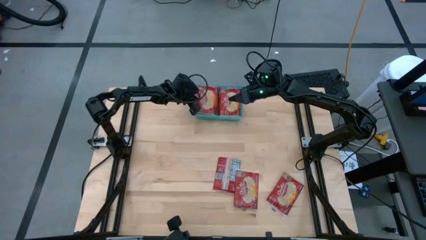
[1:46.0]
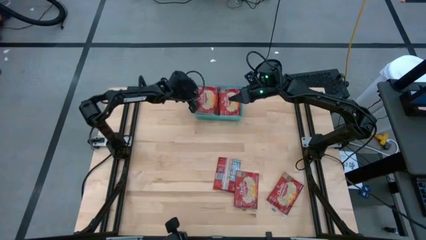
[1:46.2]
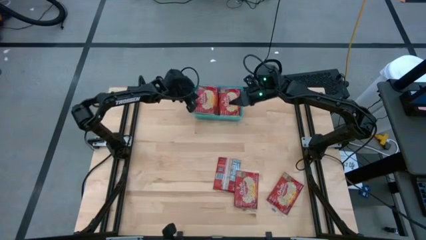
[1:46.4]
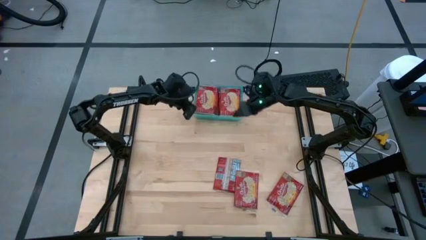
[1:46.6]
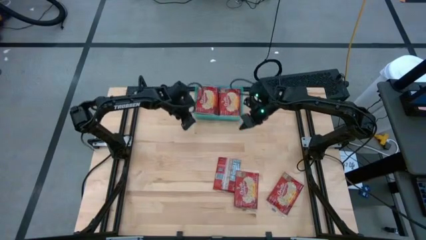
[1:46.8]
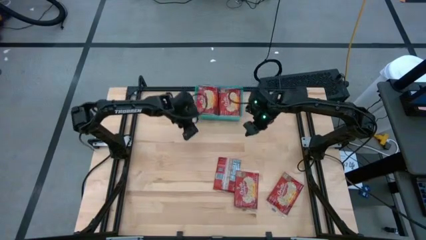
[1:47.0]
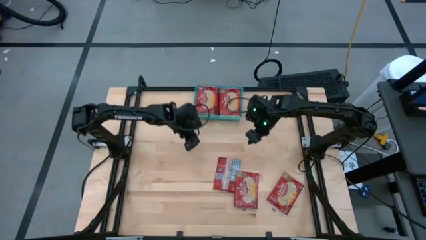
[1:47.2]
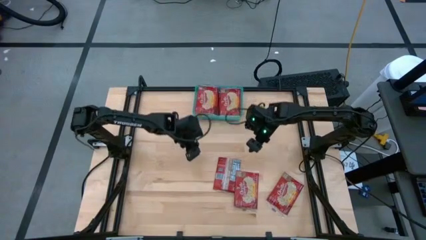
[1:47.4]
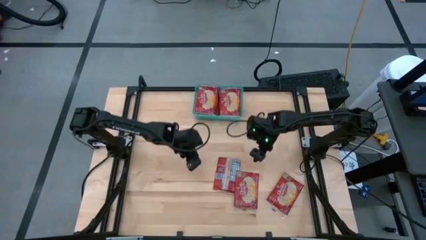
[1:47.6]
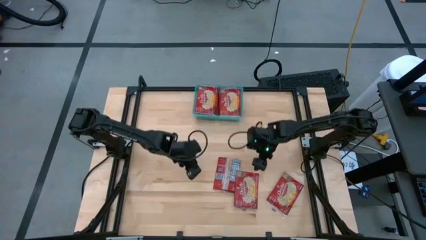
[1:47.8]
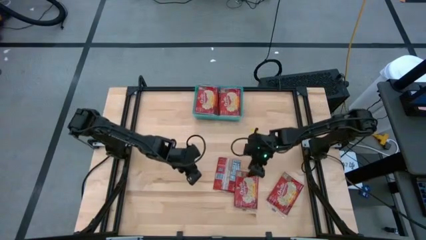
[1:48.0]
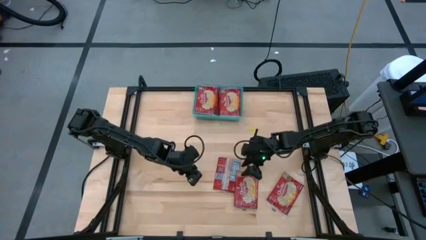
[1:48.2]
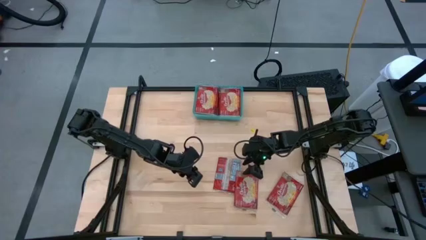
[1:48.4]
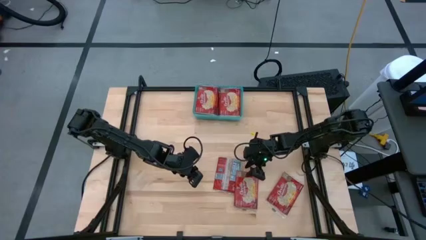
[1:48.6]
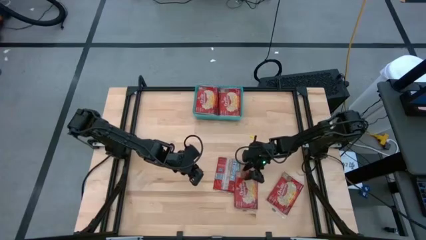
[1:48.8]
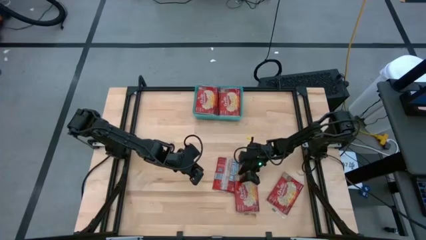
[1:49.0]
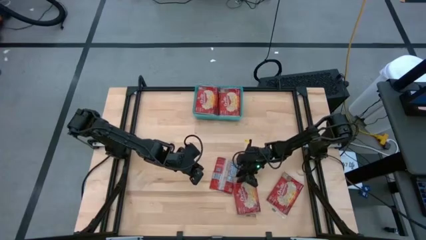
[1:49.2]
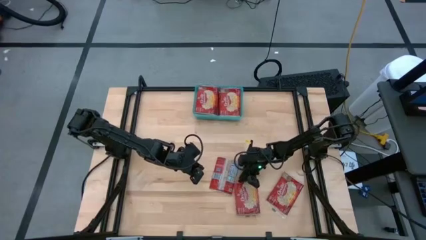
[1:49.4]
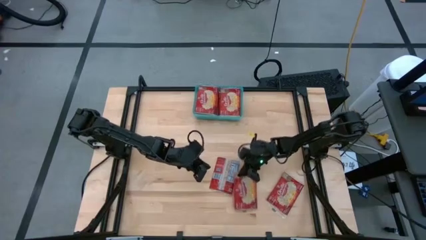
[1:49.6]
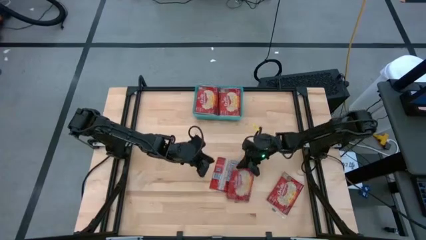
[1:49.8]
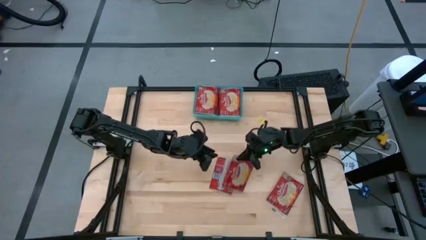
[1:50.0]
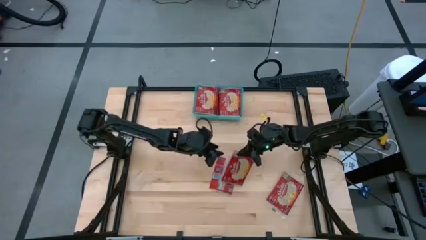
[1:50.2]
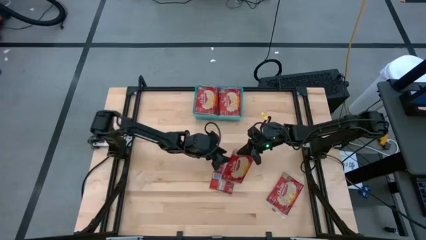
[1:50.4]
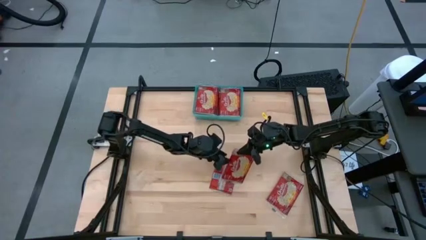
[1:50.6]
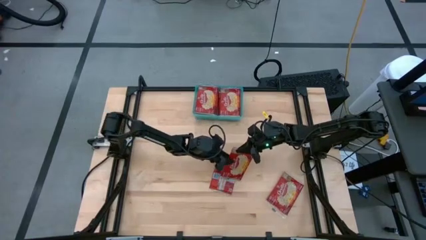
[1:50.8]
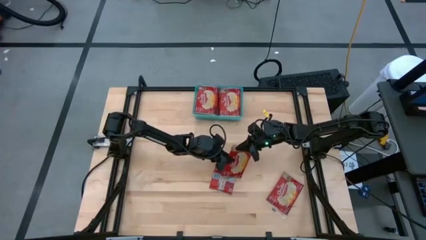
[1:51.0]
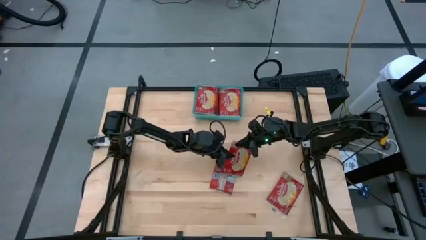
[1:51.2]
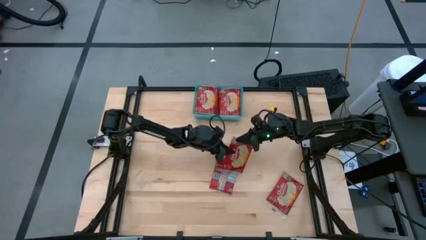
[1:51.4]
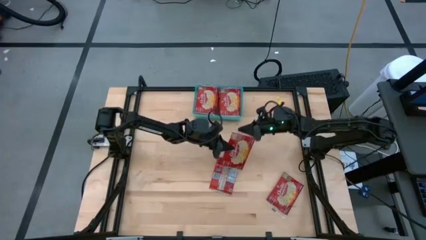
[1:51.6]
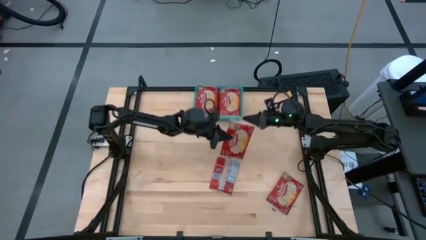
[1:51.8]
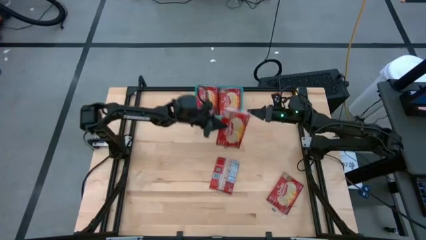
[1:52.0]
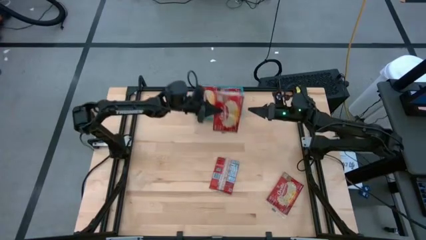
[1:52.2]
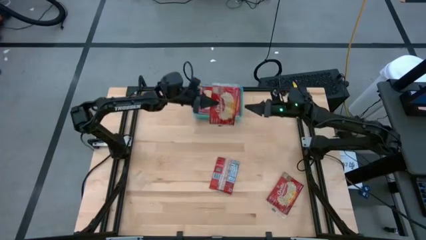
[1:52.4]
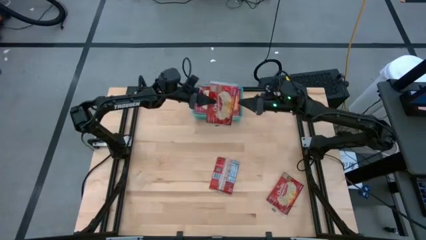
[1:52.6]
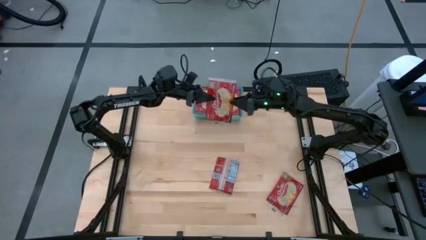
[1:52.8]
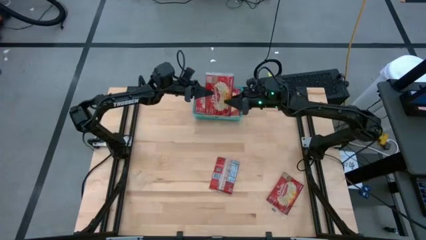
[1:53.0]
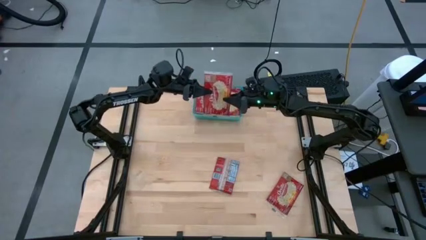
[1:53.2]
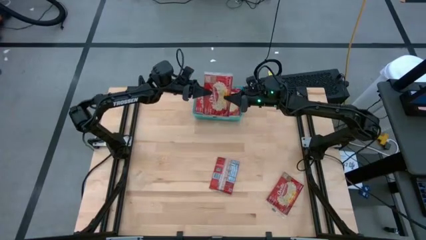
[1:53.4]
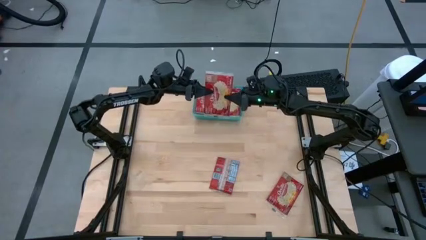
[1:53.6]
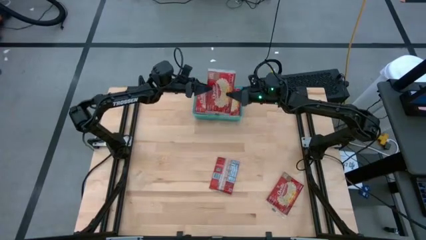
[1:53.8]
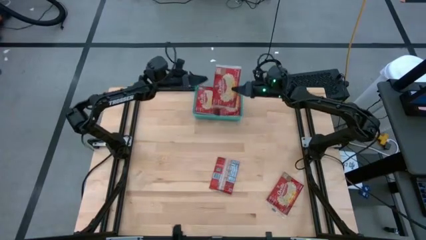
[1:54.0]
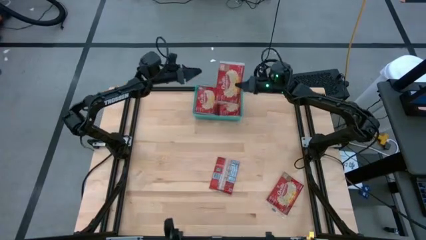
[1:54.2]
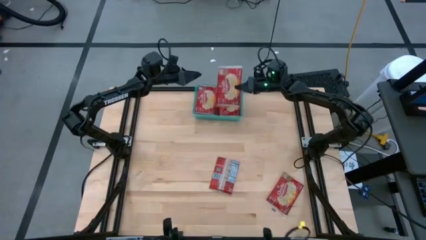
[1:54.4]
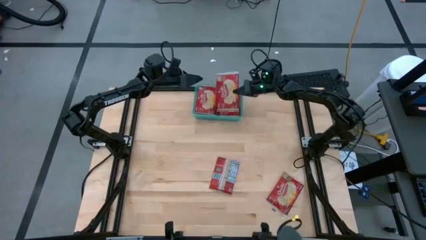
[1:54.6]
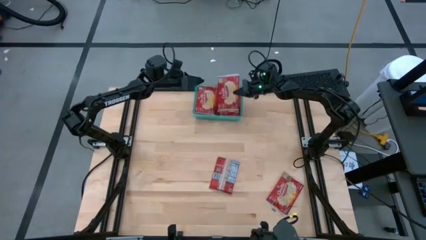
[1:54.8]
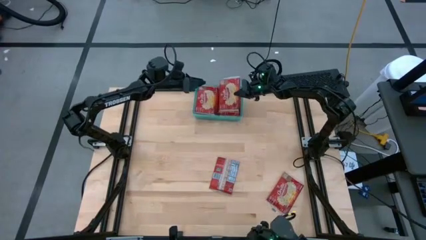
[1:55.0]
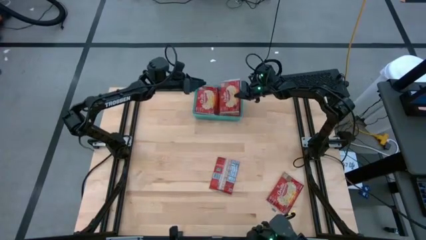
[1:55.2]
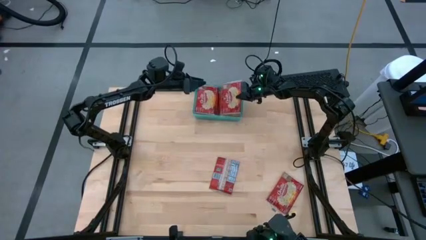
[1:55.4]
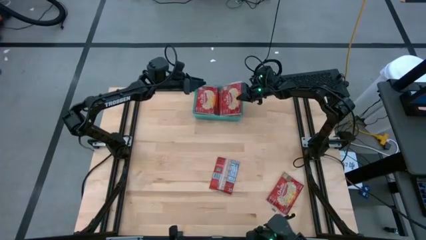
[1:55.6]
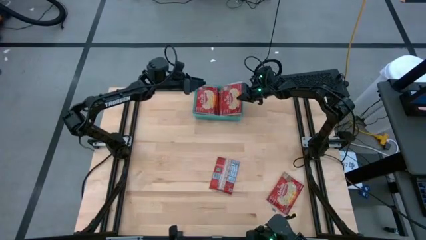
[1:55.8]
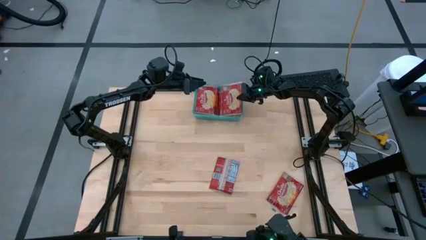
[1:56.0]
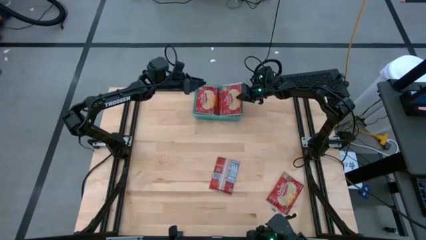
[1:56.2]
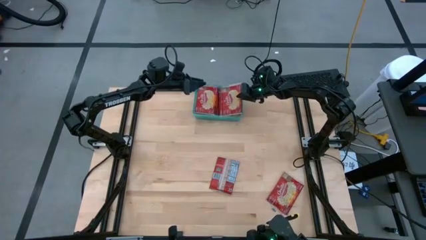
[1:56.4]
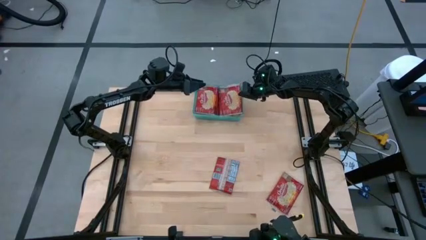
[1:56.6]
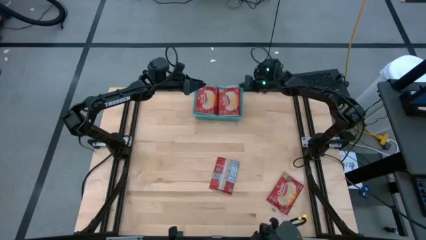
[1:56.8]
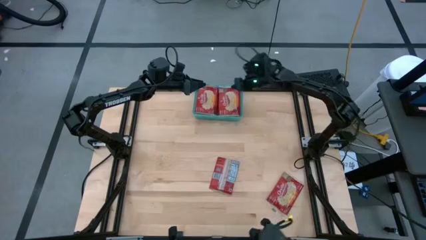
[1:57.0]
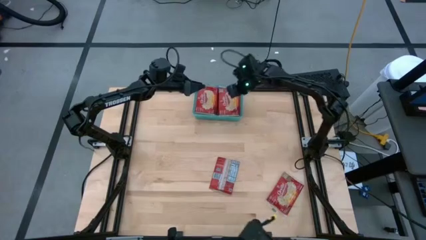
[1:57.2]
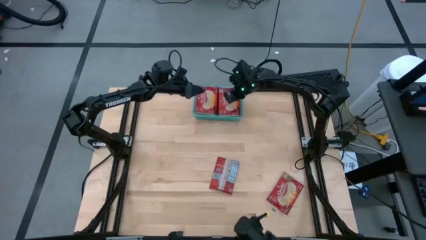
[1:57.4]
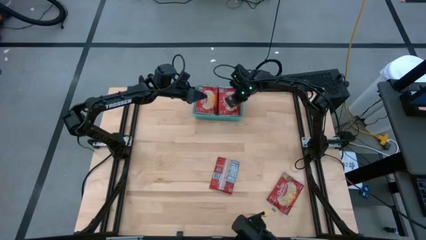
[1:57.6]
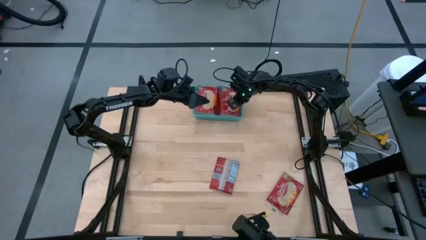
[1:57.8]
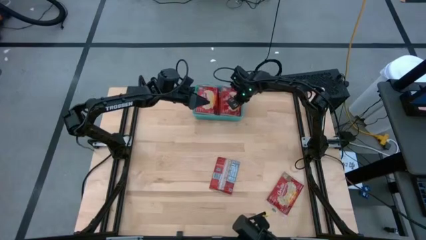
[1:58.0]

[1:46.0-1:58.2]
Task: Sort popcorn bags into baskets
Put the red popcorn bag into the blue bin
